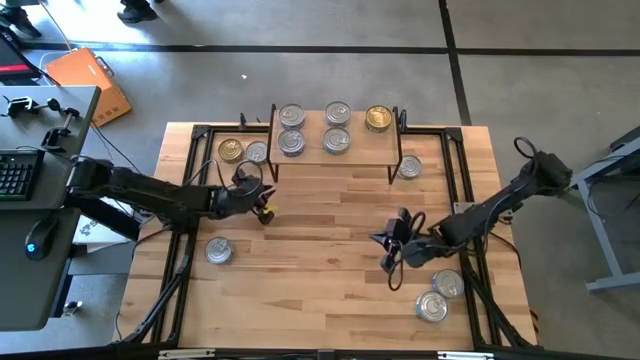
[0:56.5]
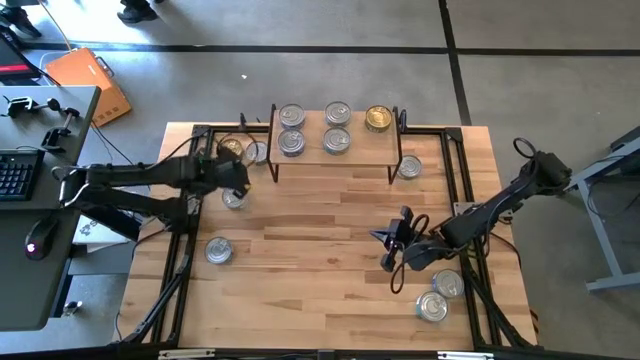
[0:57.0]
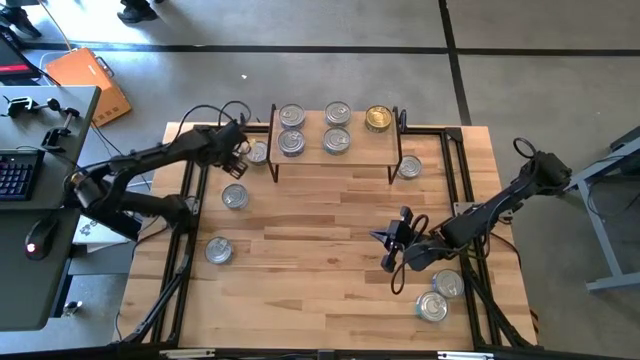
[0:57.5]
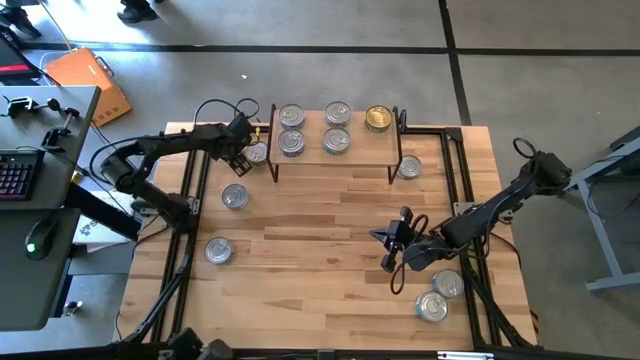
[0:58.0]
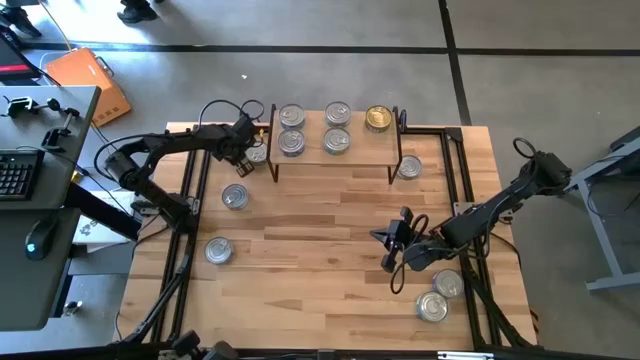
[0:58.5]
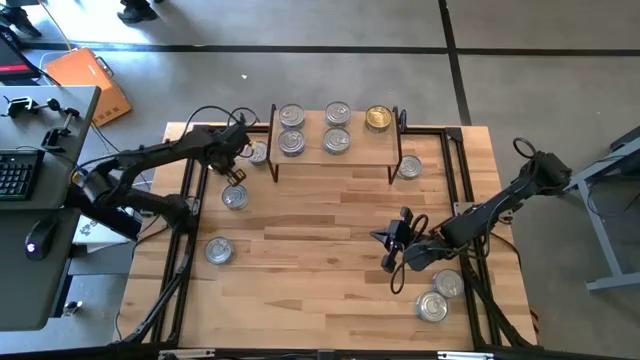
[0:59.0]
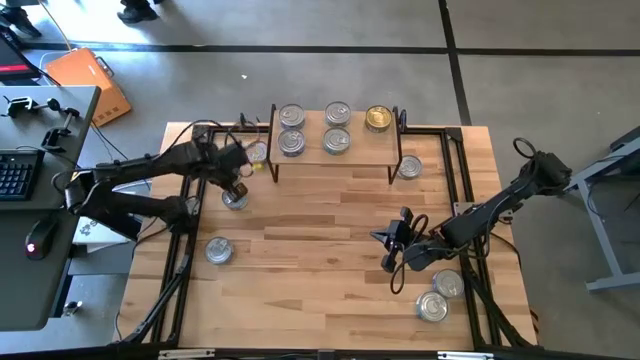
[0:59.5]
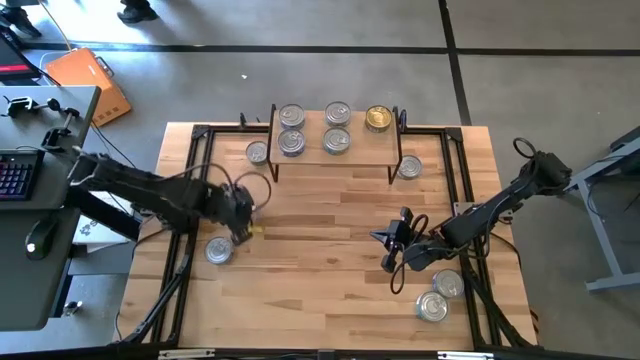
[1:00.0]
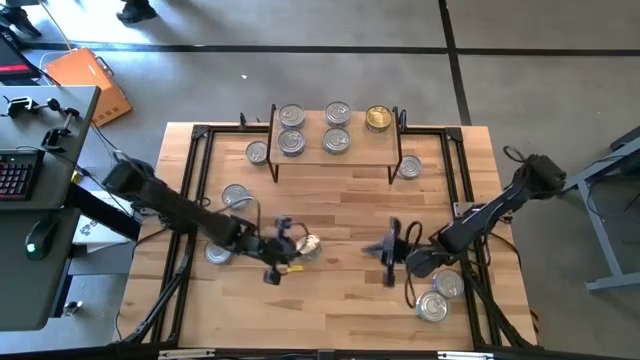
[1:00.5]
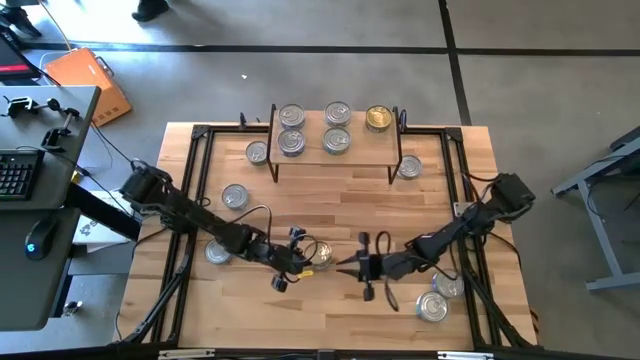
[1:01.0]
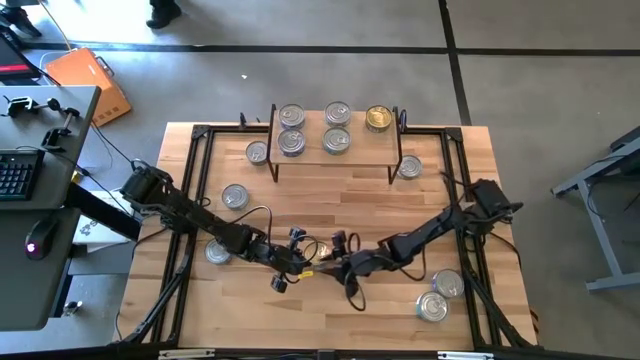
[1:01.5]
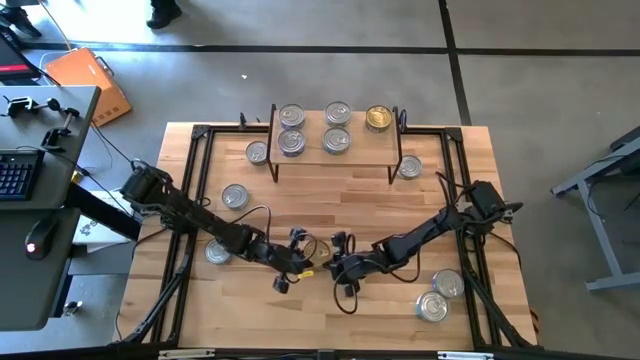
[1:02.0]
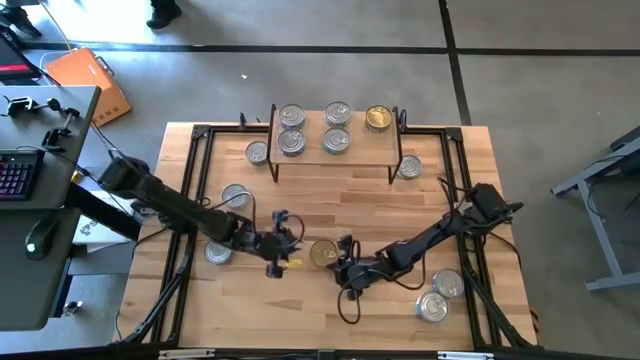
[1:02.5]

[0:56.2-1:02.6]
Task: Stack canned seafood by type on shelf
Put the green tuna can on the shelf

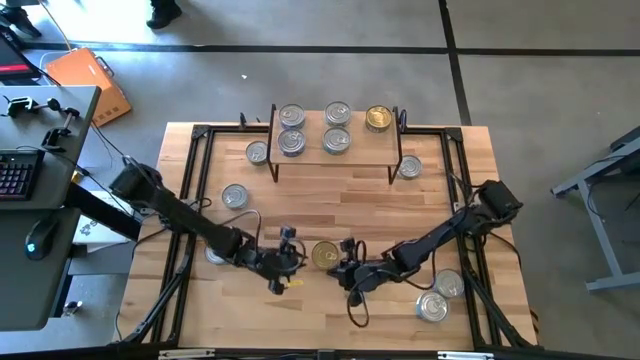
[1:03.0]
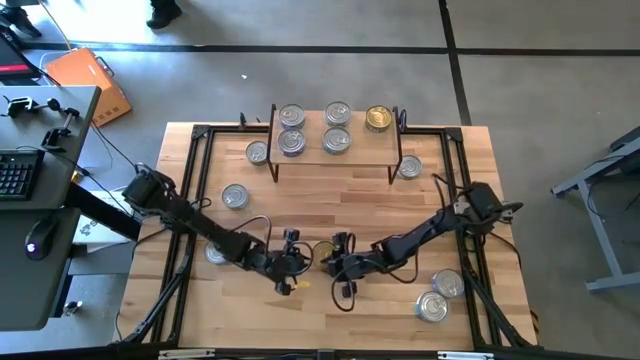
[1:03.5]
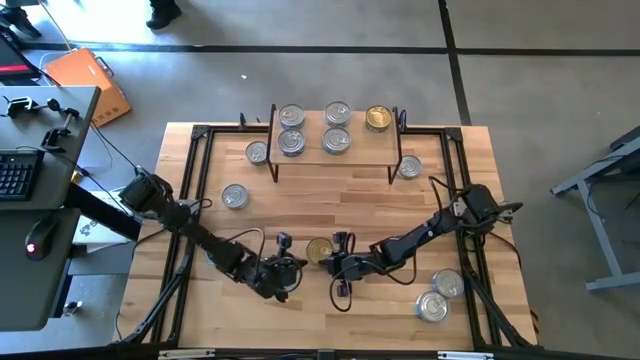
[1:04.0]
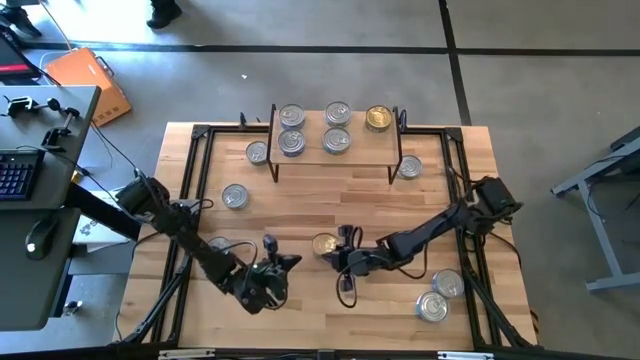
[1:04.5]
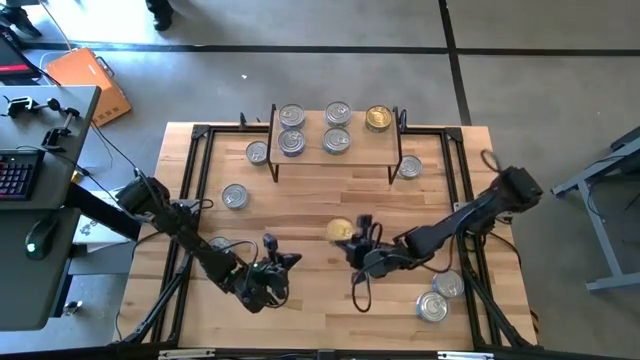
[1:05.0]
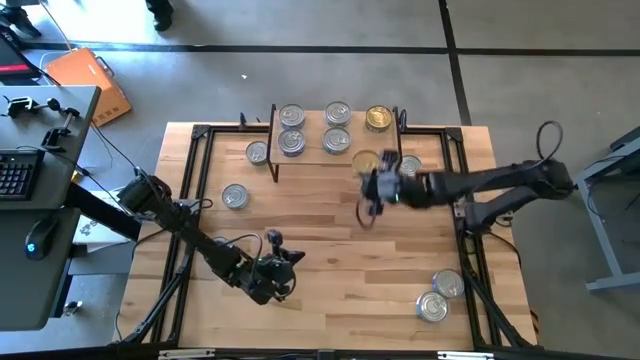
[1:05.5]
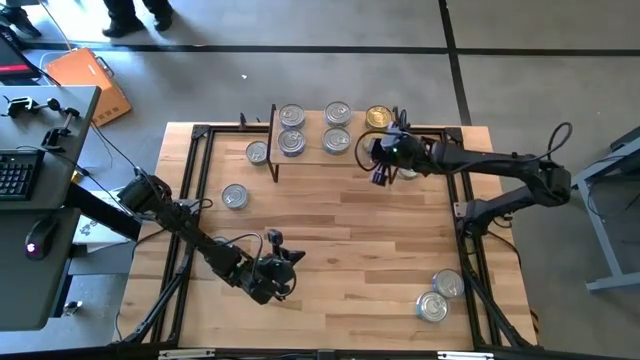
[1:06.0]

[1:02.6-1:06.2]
Put the green tuna can on the shelf

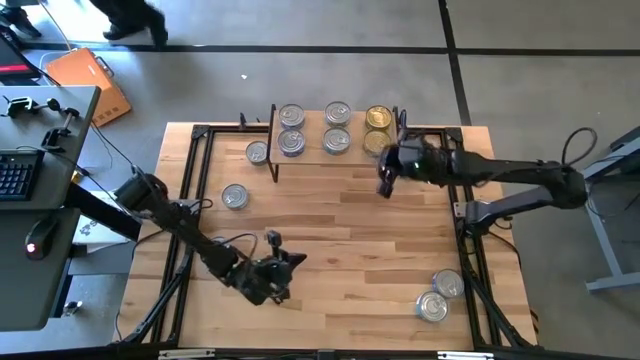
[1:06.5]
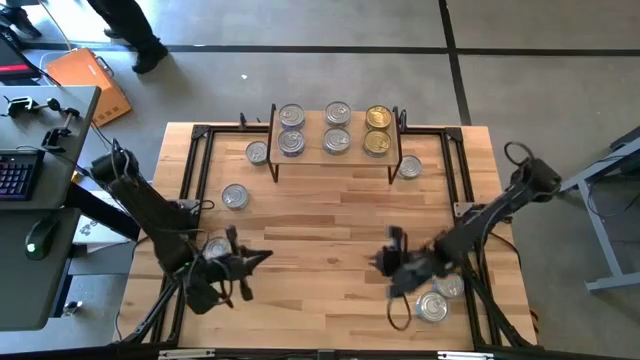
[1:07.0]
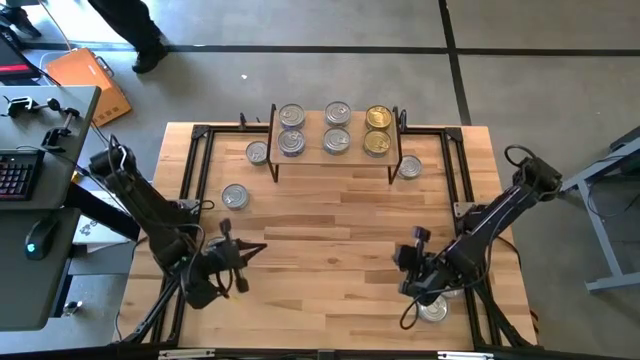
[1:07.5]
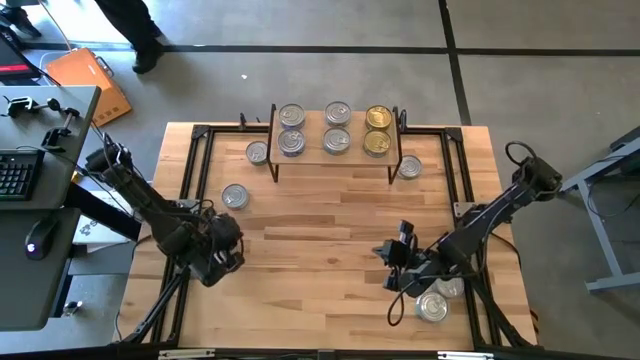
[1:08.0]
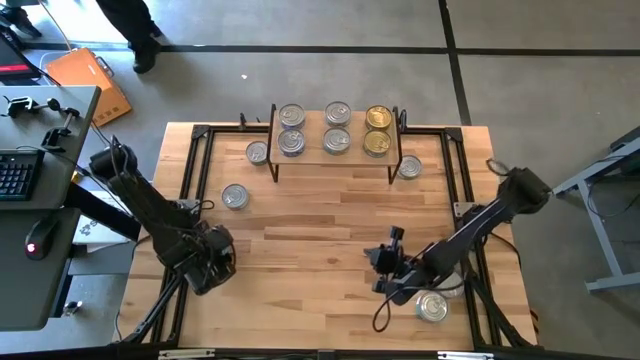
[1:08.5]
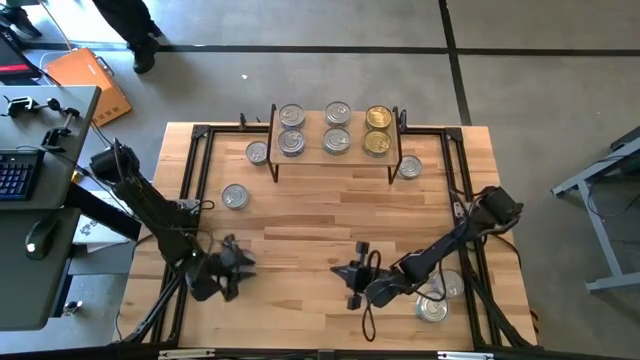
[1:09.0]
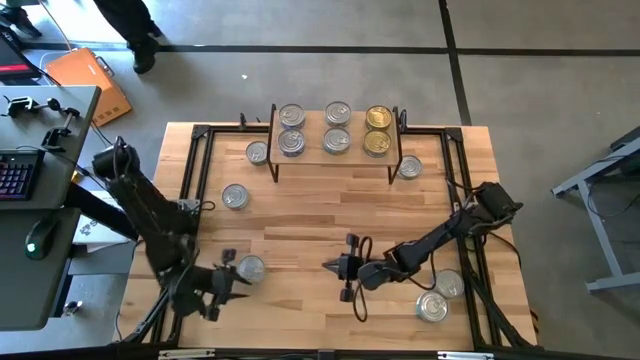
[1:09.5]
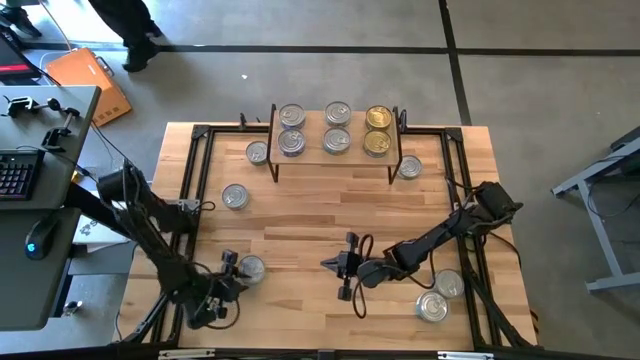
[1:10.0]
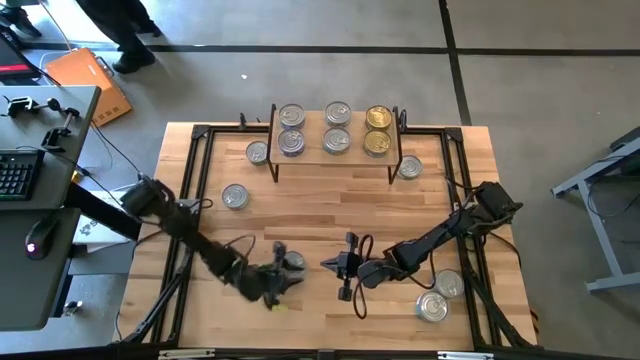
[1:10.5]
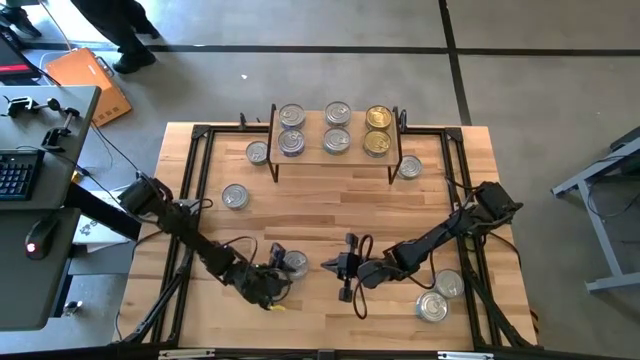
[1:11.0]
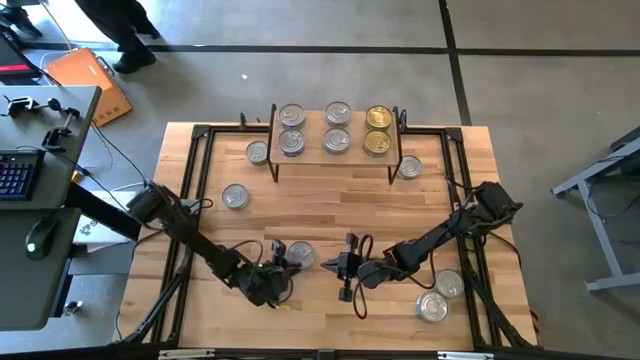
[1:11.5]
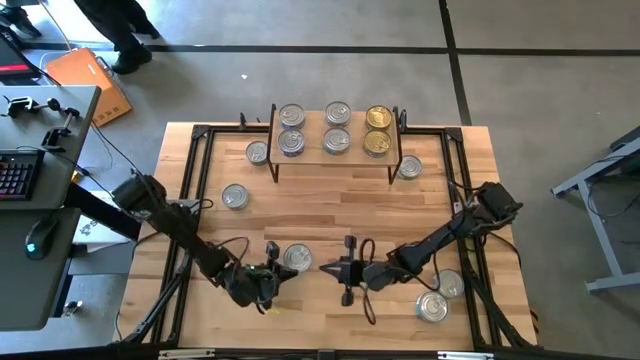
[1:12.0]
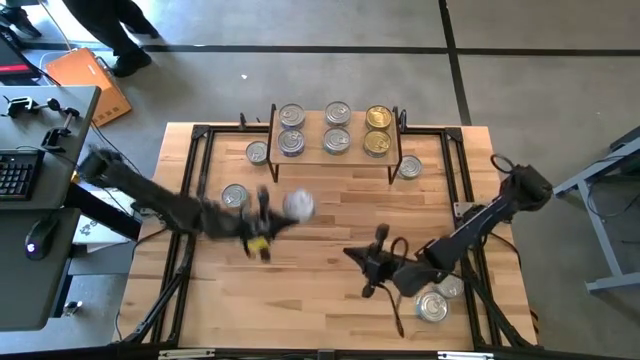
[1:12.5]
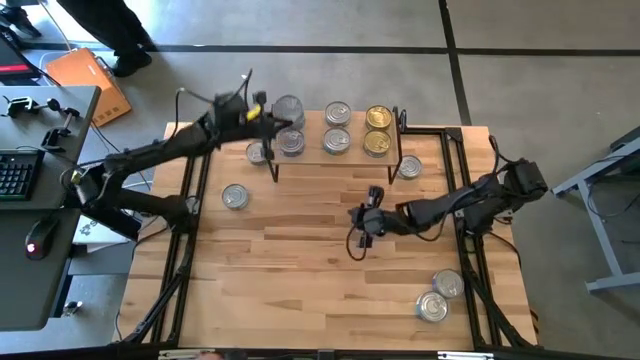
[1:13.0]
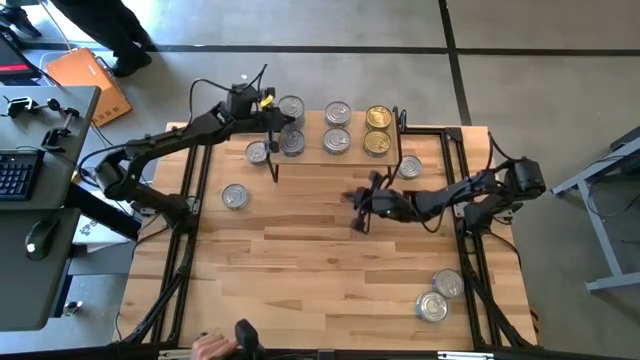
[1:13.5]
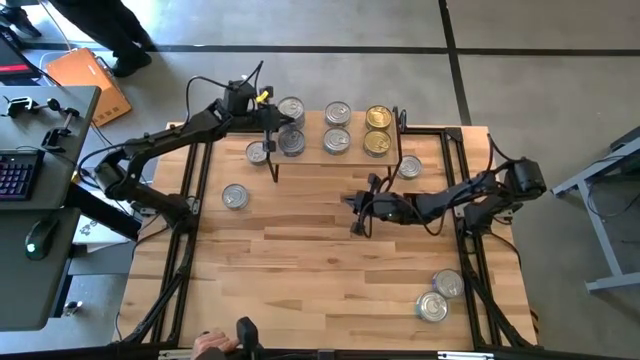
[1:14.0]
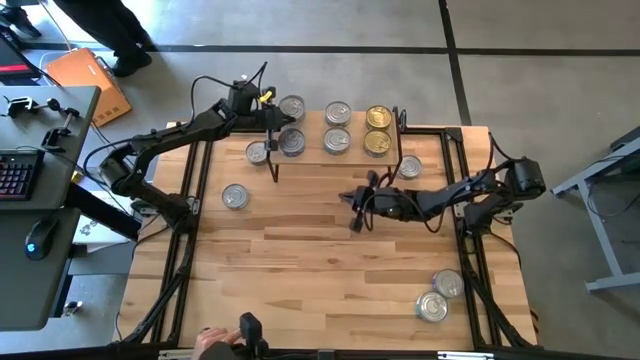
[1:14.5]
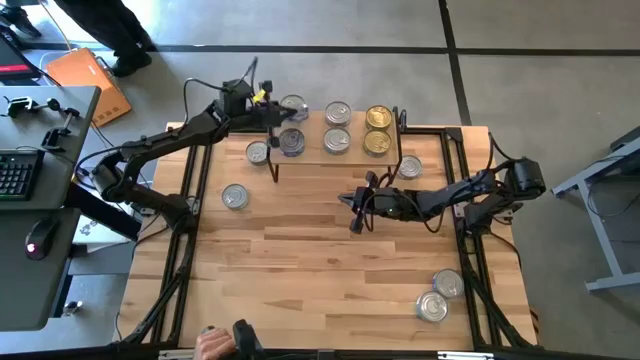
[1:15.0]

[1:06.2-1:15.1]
Stack the blue tuna can on top of the other blue tuna can on the shelf

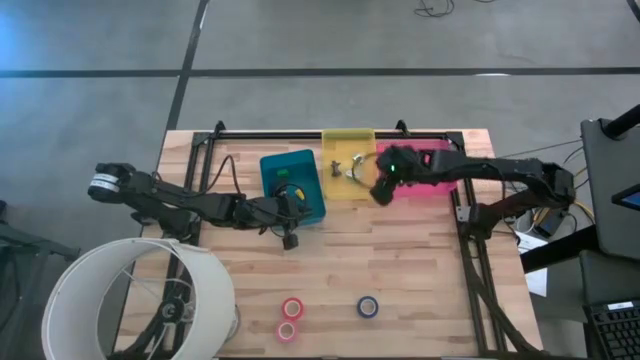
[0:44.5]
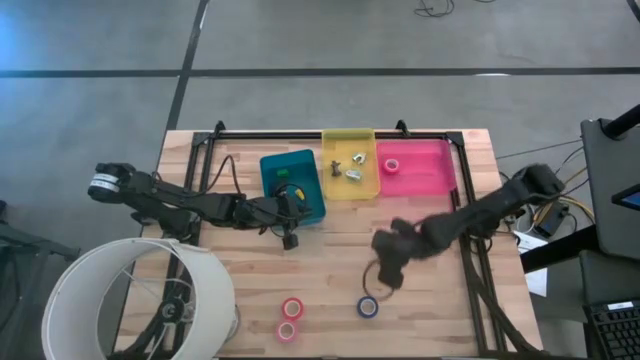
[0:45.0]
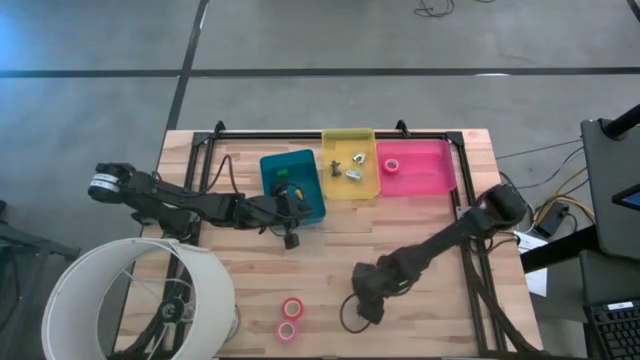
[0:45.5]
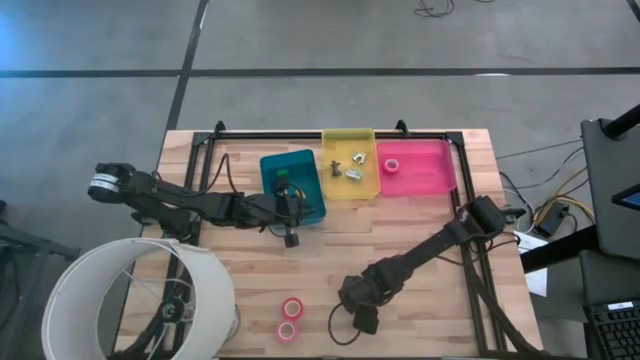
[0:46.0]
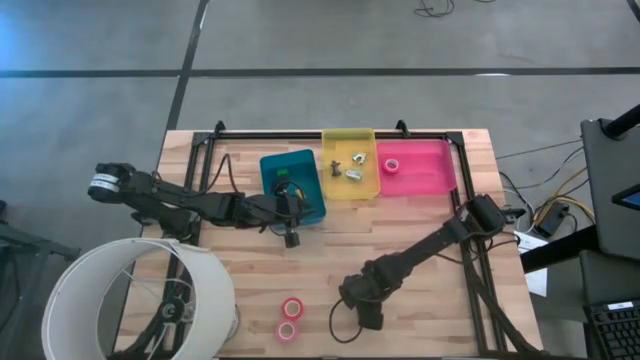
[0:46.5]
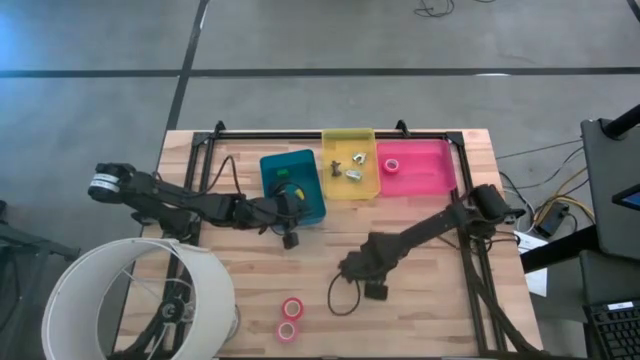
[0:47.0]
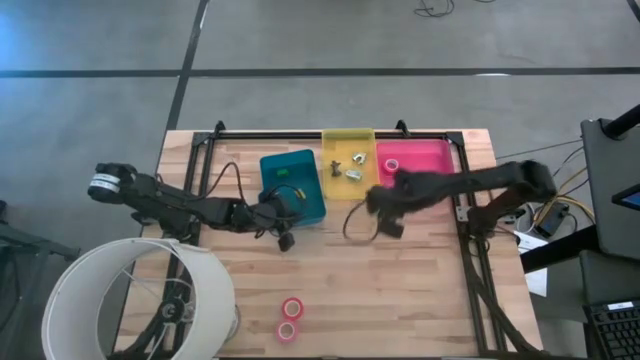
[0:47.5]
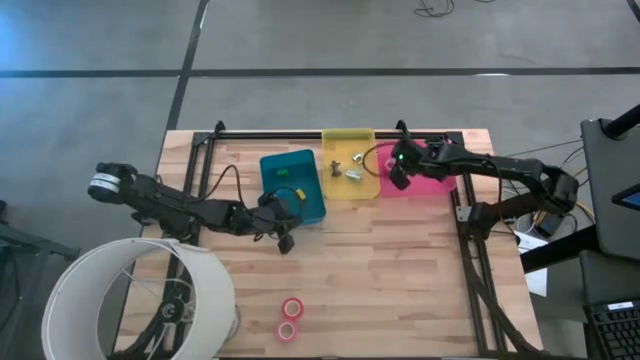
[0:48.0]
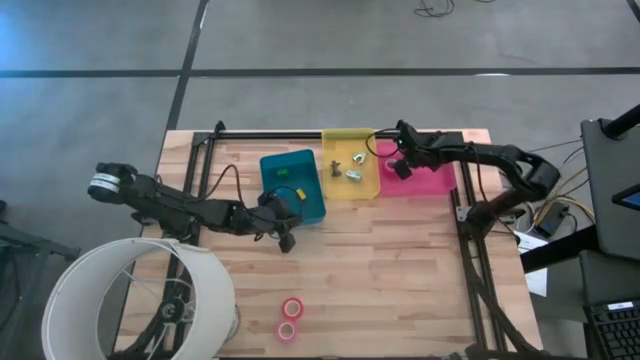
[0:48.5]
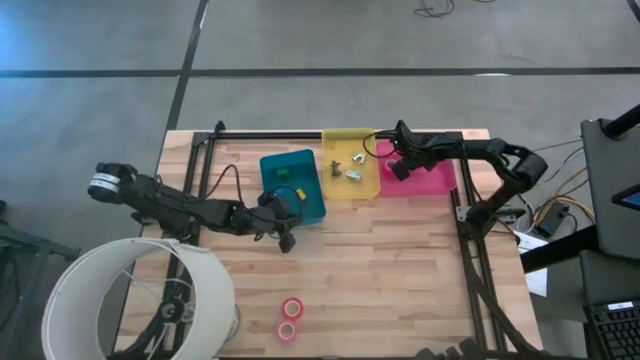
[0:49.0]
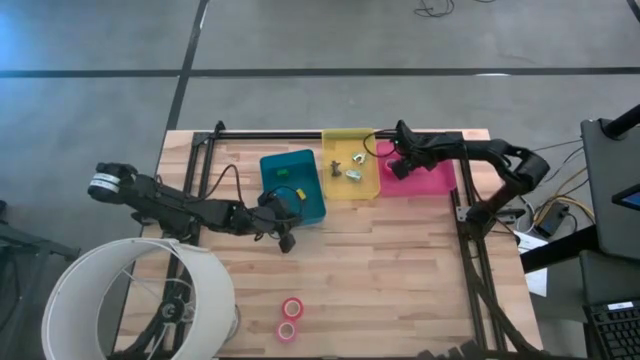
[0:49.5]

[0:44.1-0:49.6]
Task: Pick and place Stapler, Stapler remover, tape
Put the blue tape into the red bin
